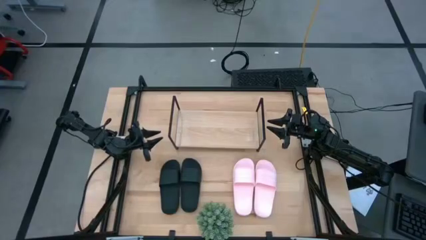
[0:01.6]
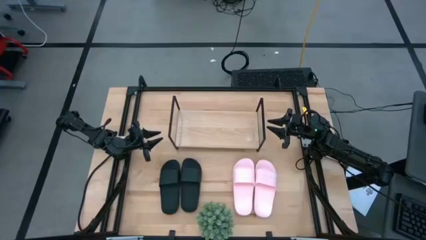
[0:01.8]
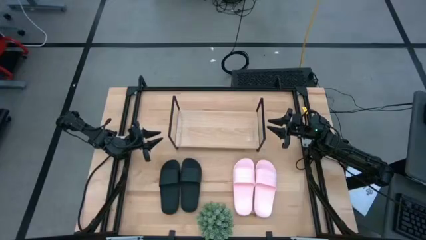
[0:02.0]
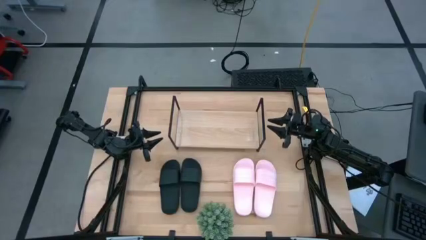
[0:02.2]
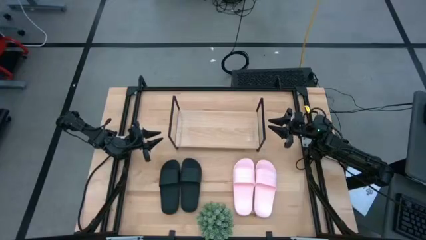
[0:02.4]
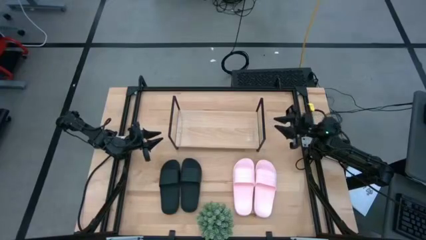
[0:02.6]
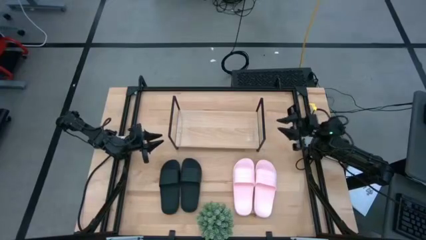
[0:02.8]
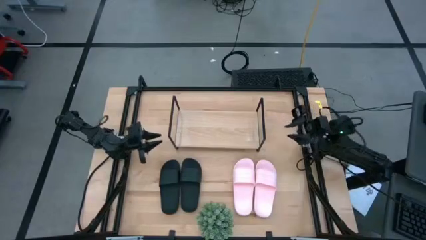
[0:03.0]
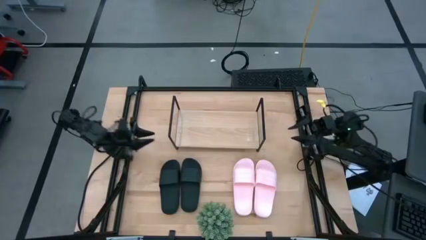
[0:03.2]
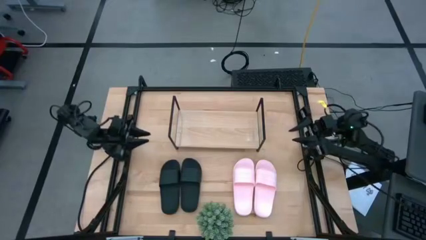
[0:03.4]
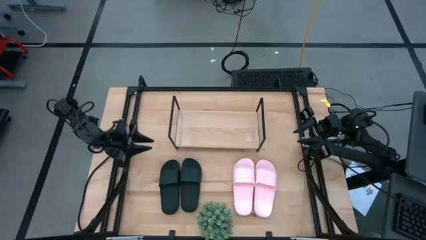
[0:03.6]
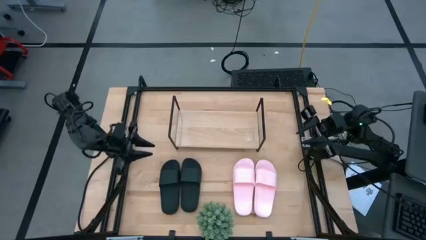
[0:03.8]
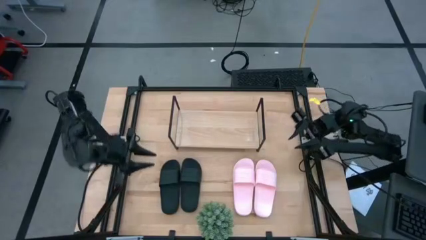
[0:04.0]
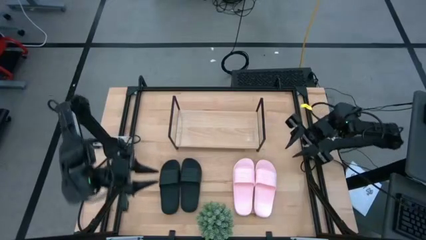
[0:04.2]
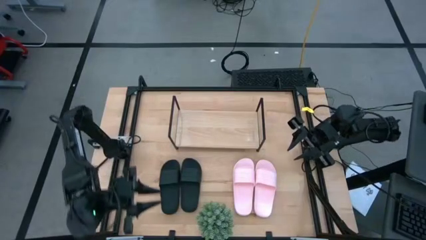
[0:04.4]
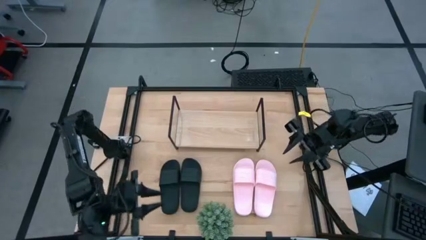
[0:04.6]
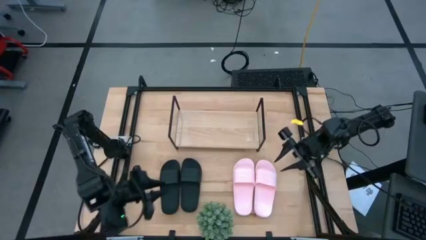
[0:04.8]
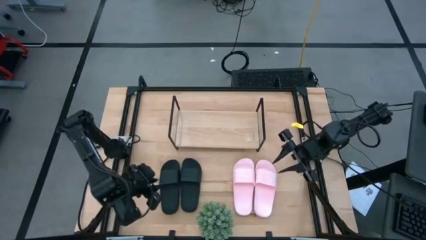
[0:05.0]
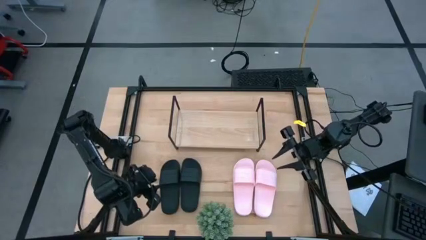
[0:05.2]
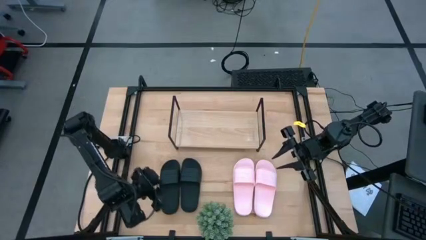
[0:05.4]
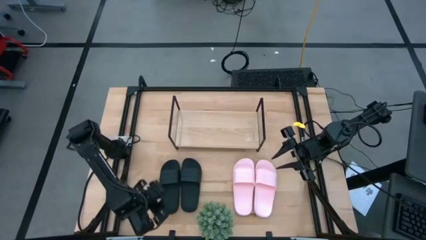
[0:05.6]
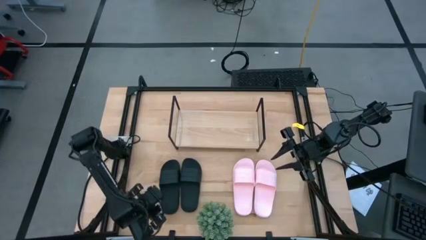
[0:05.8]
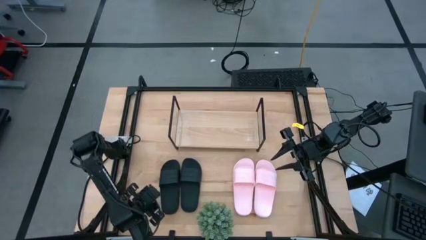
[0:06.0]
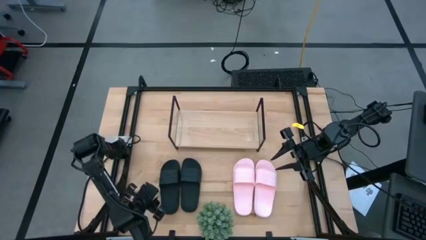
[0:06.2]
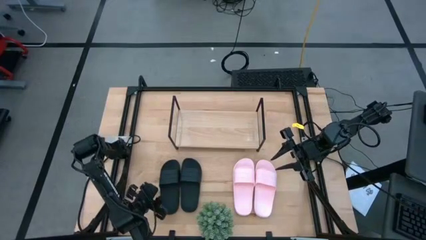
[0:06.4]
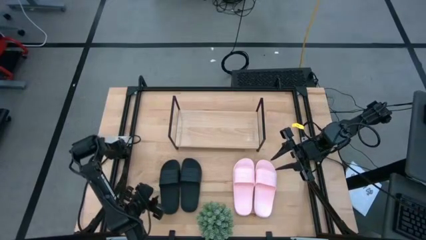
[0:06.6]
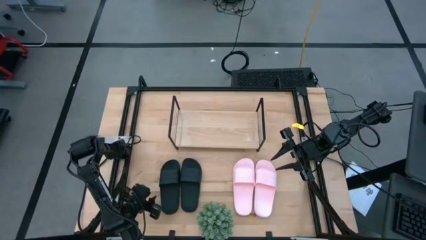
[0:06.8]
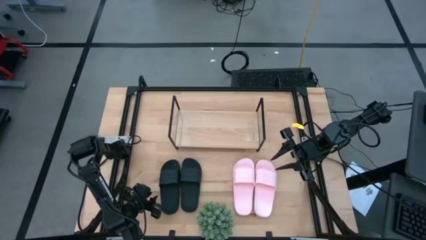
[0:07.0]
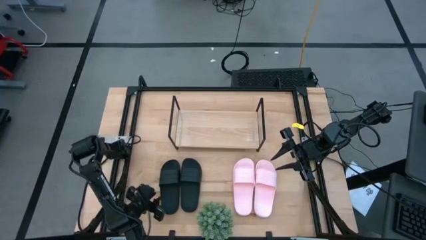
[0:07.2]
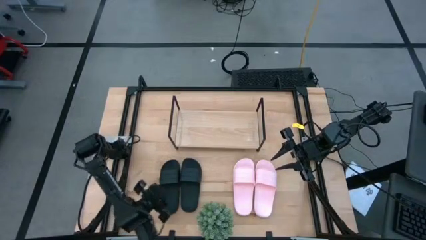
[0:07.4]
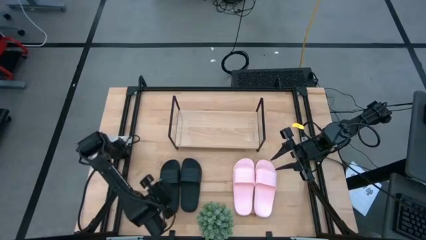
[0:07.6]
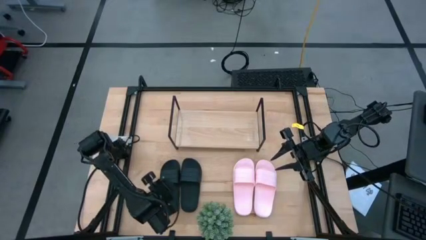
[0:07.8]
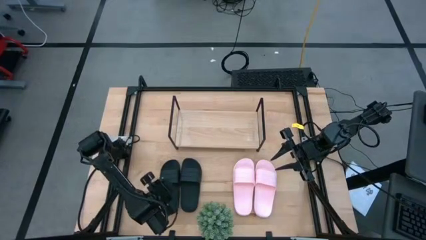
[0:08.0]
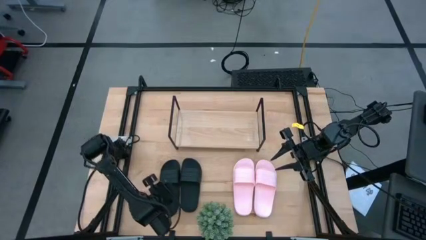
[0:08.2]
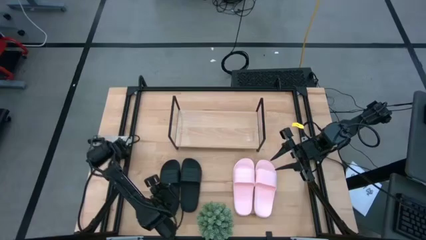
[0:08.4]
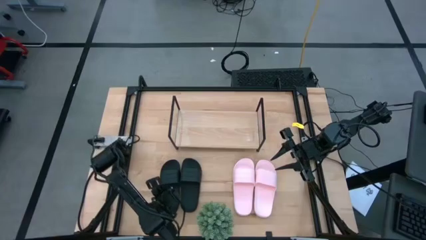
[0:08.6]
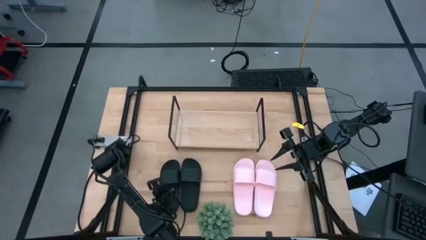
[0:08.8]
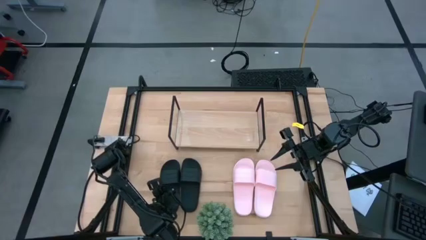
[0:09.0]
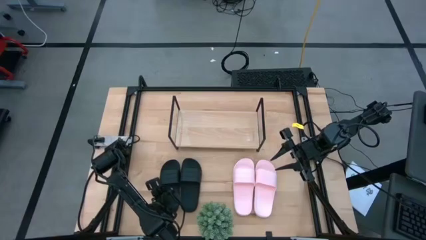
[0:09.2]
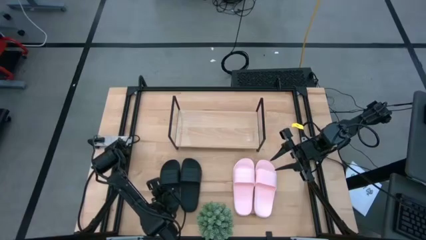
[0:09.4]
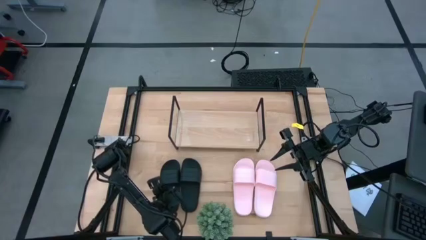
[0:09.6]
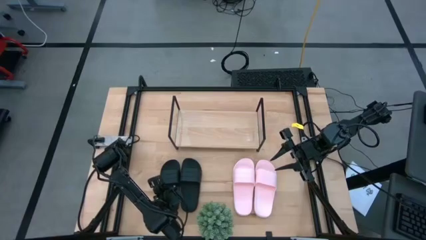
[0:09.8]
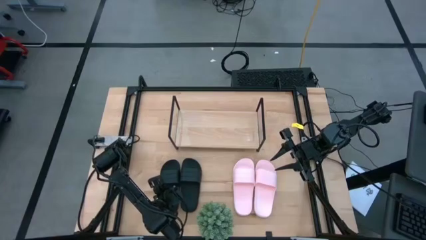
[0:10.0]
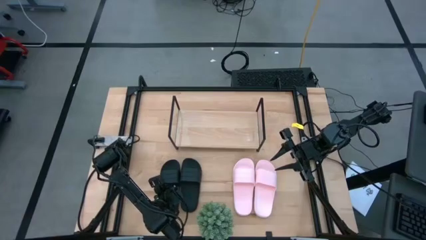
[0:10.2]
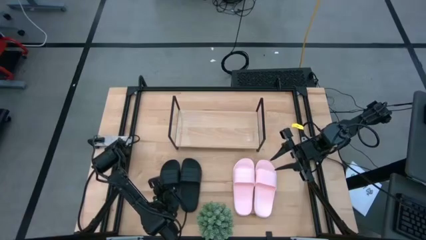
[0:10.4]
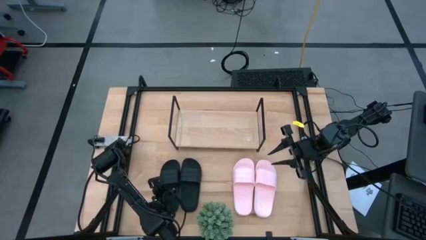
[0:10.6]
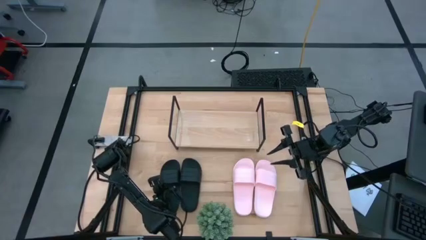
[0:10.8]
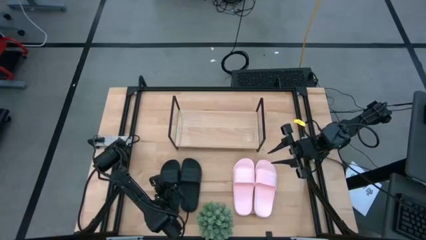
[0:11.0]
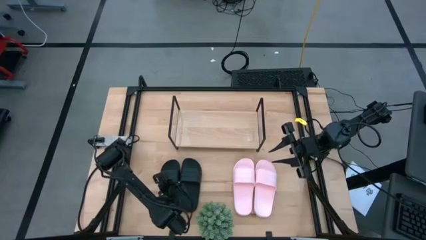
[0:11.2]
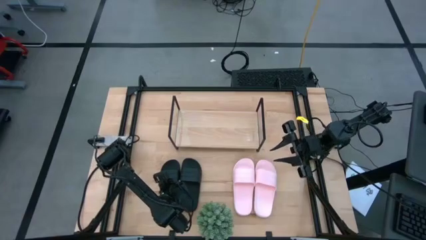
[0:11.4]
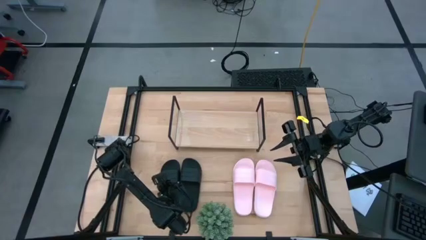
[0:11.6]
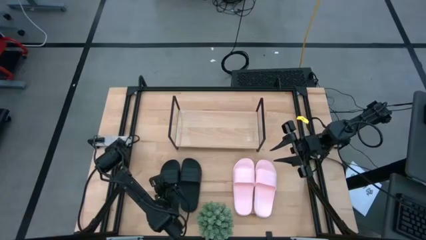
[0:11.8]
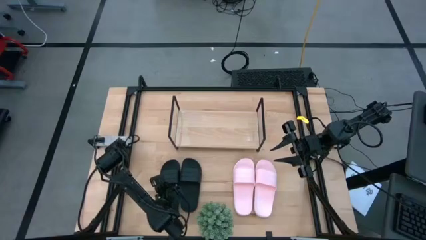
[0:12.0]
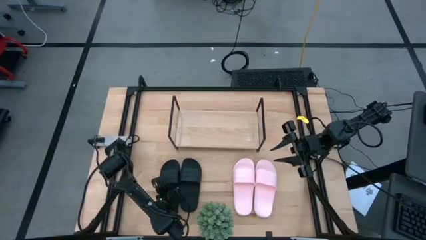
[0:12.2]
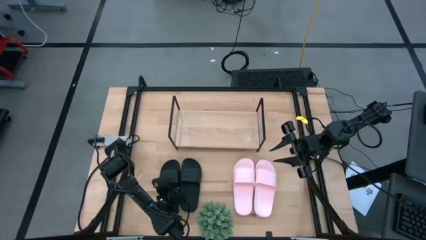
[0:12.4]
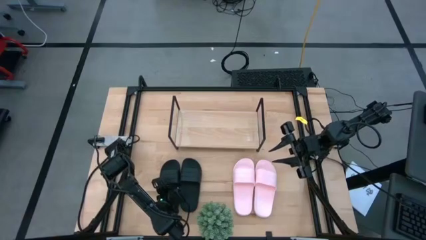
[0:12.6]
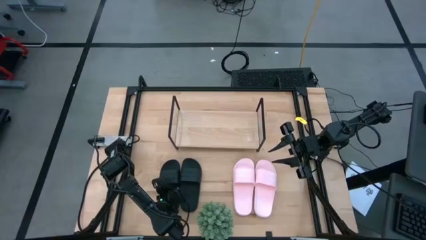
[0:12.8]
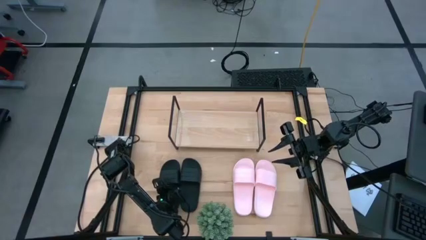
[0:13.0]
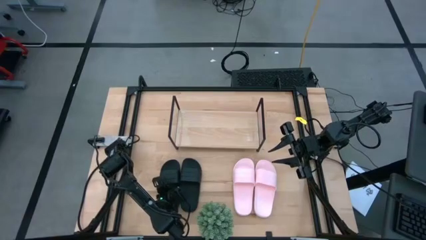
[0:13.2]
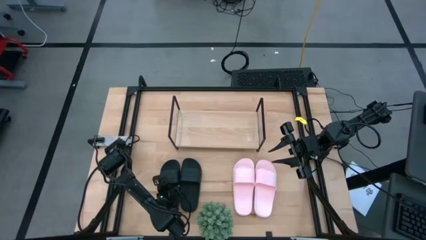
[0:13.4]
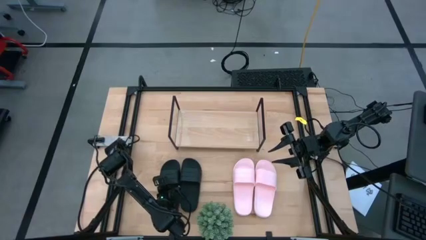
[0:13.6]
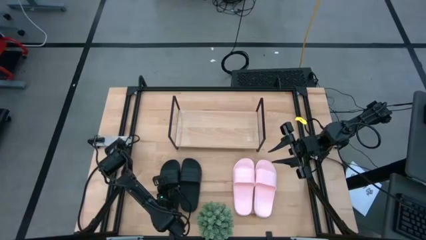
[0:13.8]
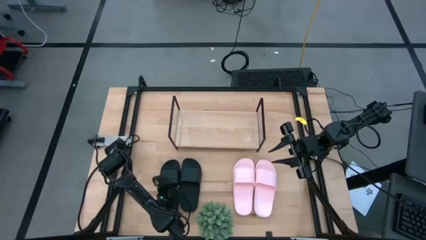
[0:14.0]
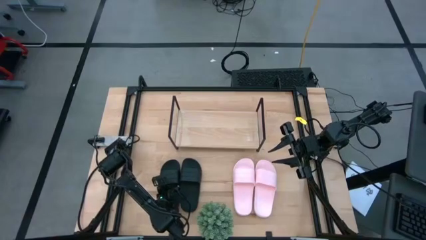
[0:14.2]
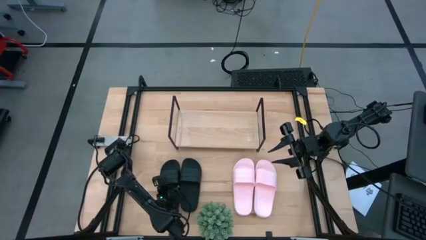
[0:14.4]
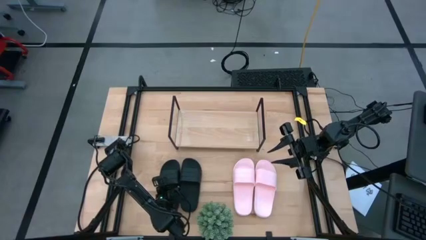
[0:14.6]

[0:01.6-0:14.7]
Task: Pick and place slides into the shelf
Put the left black slide on the shelf
